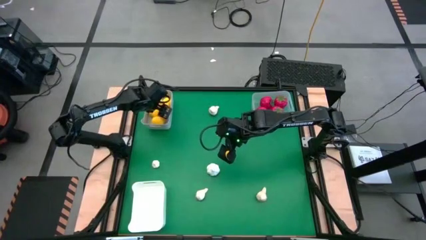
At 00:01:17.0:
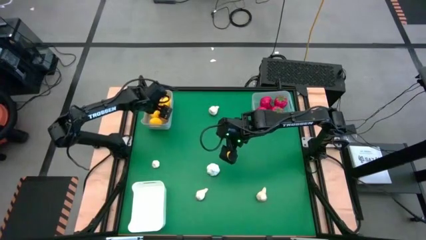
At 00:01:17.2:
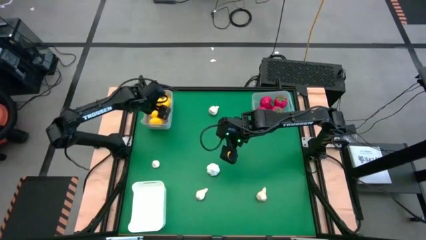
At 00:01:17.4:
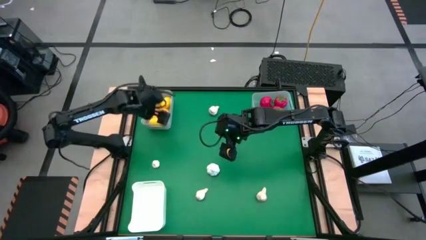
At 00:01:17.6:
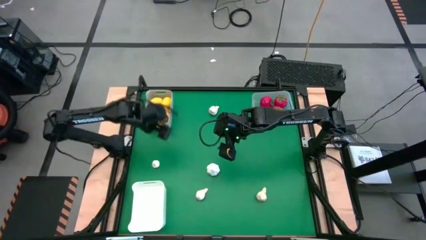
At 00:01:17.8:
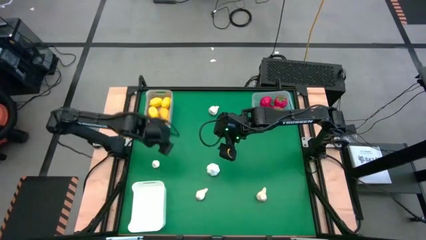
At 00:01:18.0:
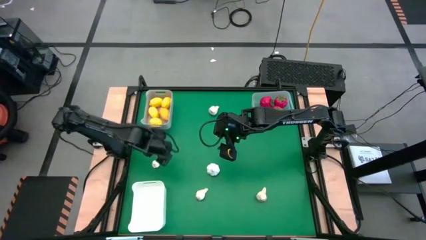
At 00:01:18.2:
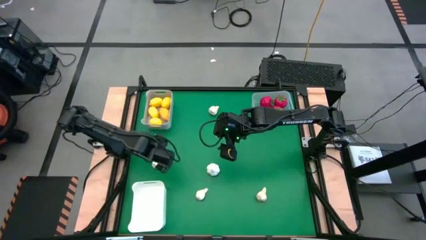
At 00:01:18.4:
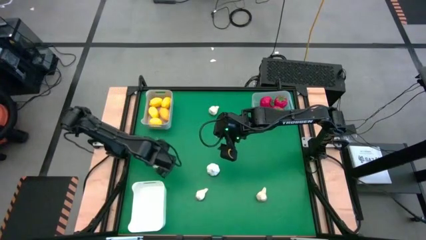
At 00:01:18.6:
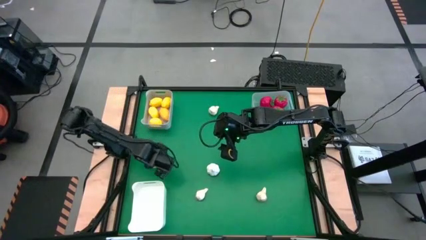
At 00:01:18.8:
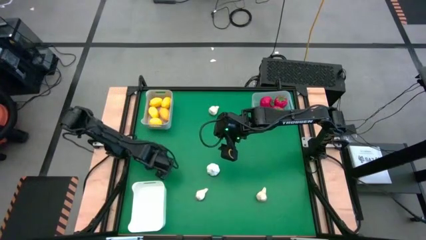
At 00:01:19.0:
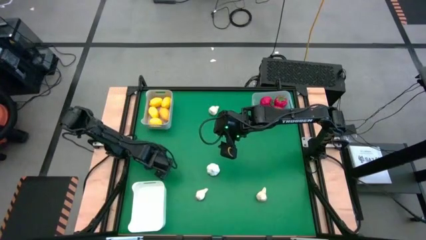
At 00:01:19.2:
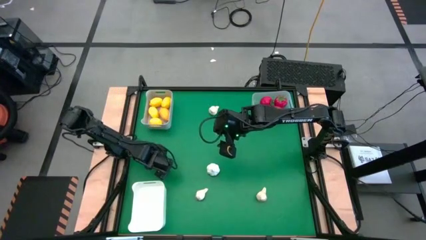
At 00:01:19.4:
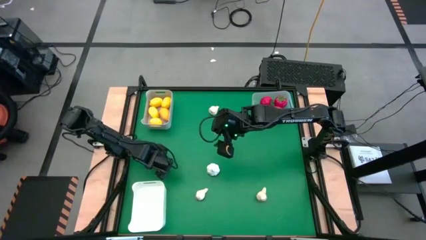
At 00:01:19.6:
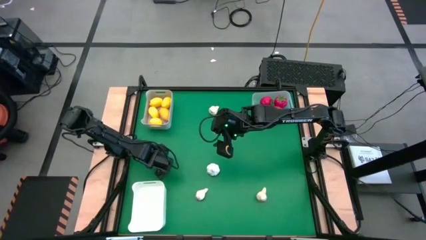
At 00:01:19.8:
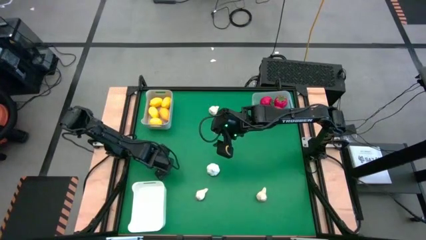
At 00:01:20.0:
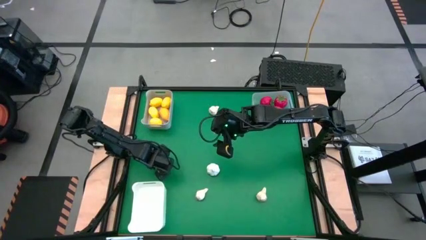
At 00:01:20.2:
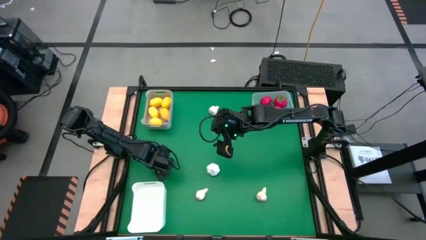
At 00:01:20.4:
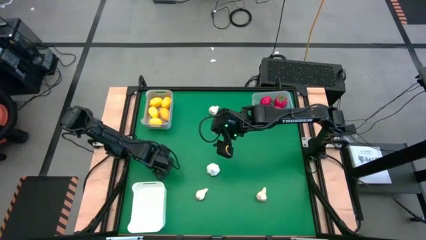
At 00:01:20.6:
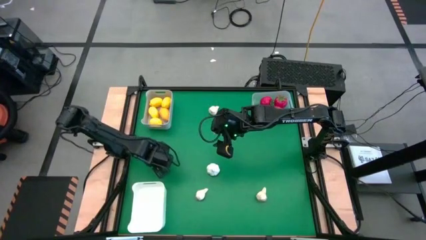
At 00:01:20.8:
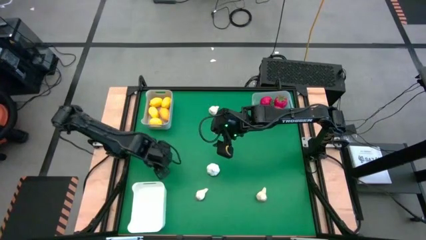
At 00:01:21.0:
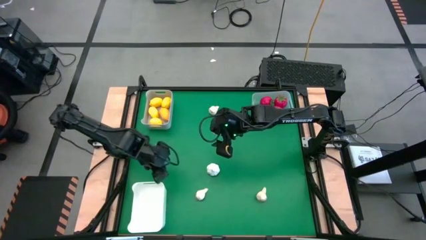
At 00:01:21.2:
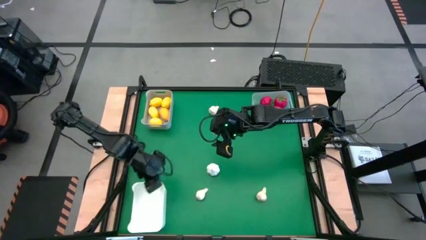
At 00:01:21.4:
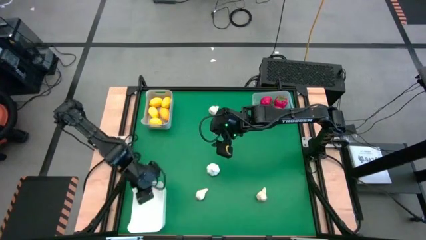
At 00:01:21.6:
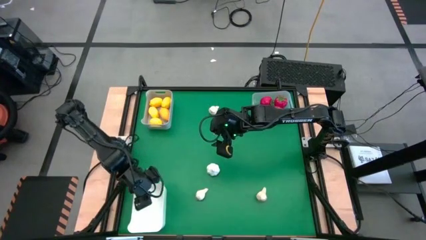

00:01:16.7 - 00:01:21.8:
Task: Sort produce into baskets
Put the garlic into the white bin

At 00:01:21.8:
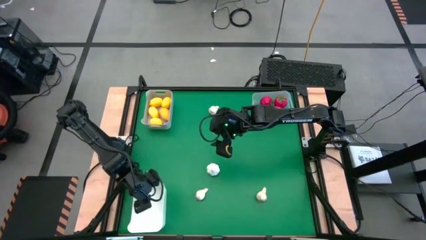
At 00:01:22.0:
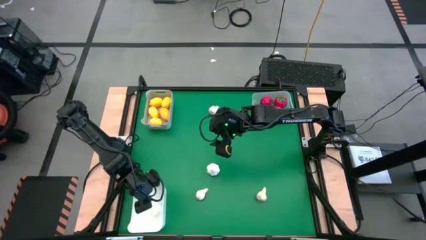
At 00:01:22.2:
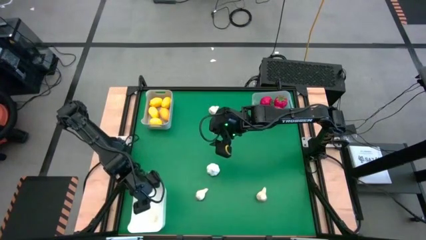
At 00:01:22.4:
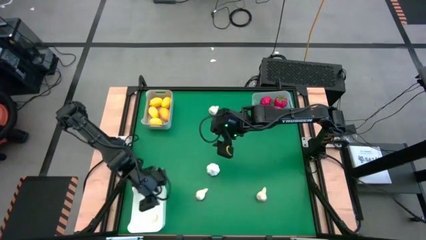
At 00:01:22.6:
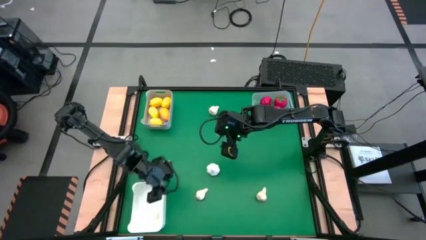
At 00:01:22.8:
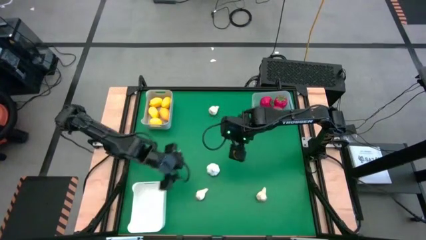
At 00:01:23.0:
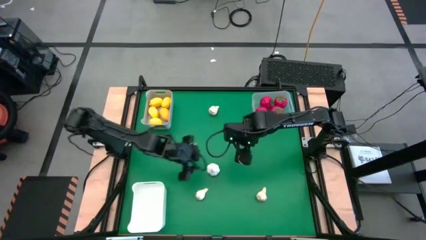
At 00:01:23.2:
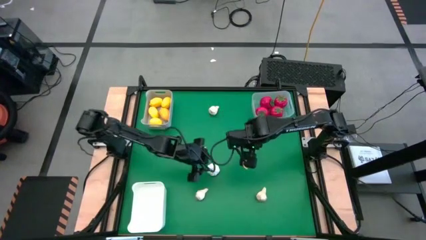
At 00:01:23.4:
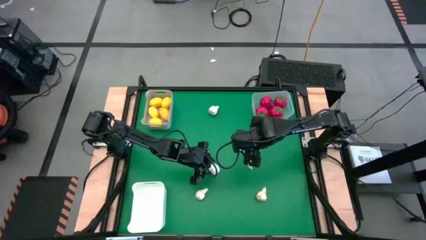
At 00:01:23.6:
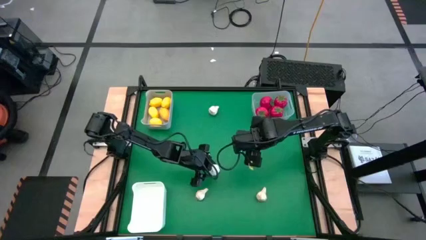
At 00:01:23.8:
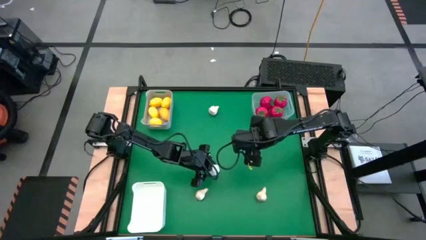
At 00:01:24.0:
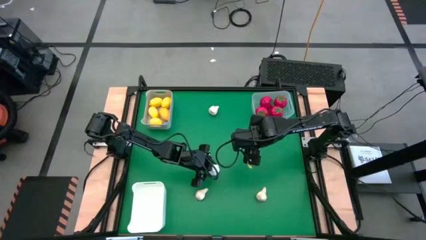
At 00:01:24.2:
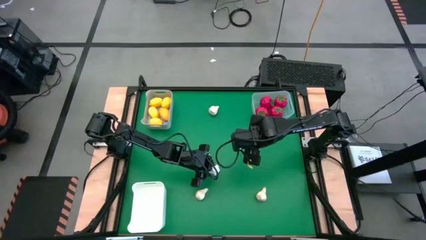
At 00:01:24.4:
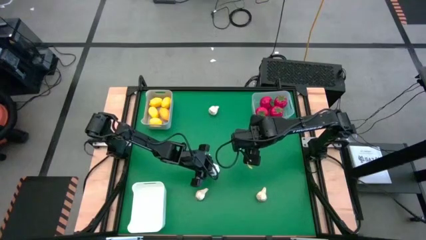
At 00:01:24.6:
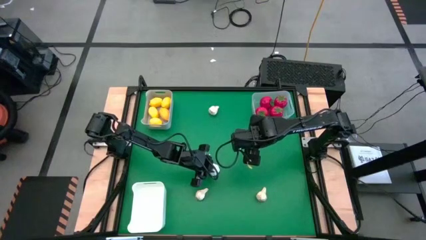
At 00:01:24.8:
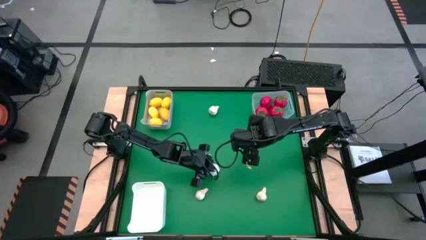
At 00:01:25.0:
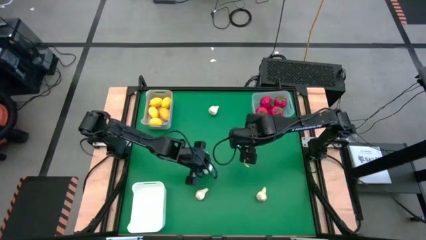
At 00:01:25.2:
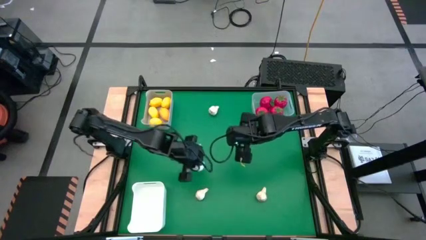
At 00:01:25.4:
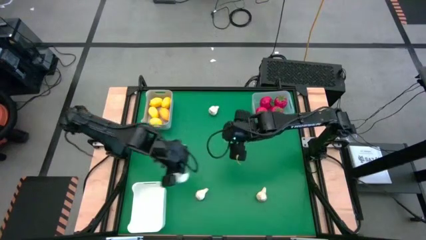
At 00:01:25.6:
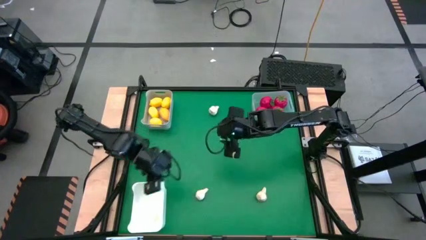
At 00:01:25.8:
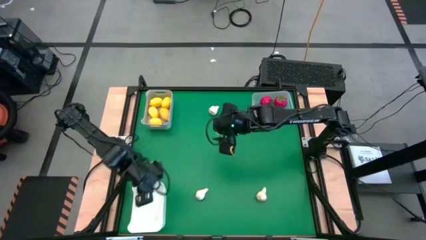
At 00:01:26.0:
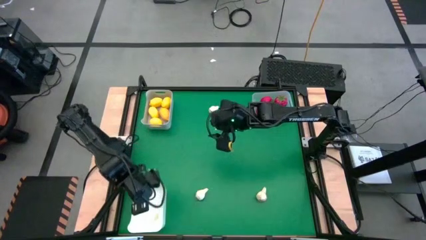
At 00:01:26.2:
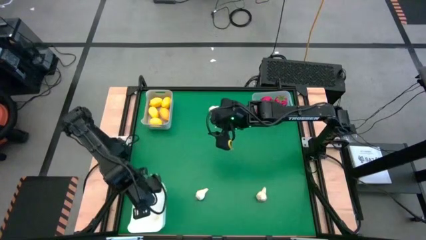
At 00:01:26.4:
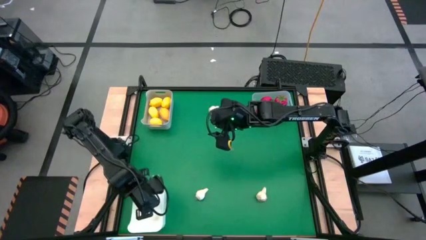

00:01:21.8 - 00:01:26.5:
Put the garlic into the white bin

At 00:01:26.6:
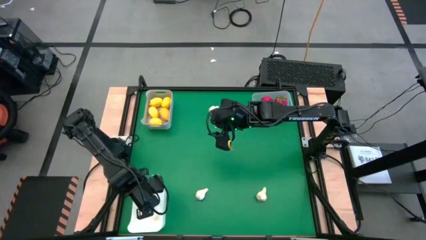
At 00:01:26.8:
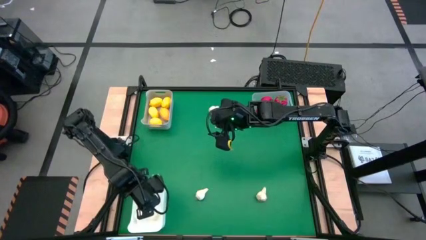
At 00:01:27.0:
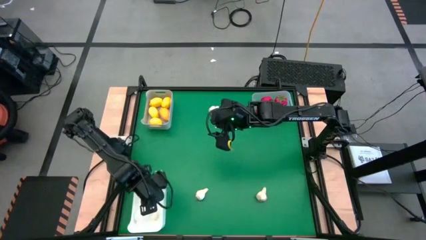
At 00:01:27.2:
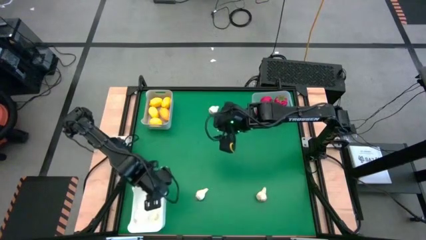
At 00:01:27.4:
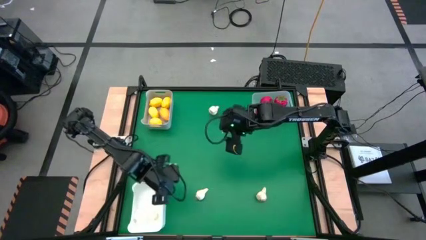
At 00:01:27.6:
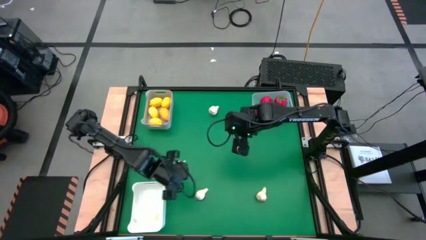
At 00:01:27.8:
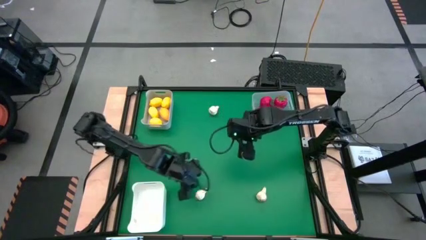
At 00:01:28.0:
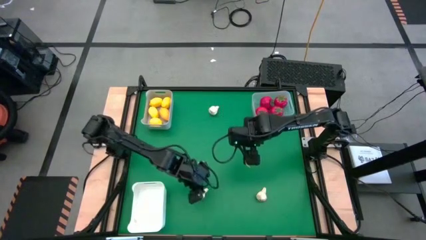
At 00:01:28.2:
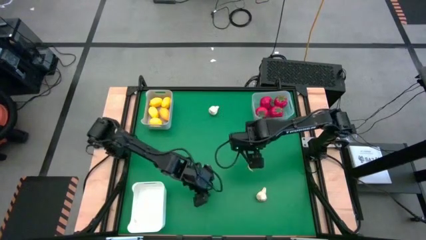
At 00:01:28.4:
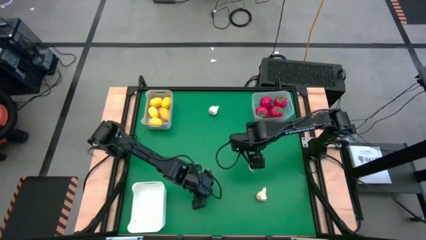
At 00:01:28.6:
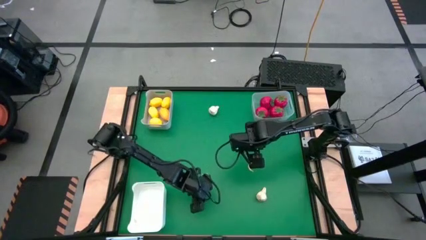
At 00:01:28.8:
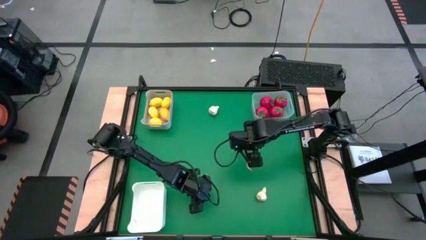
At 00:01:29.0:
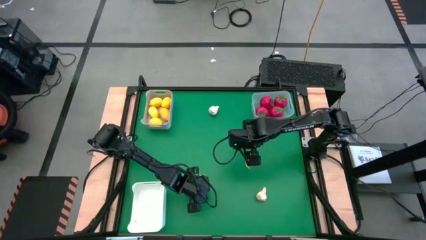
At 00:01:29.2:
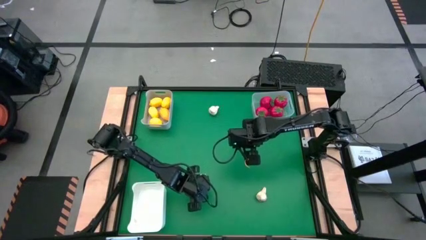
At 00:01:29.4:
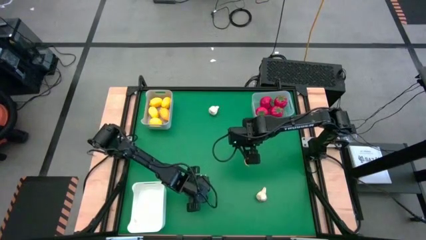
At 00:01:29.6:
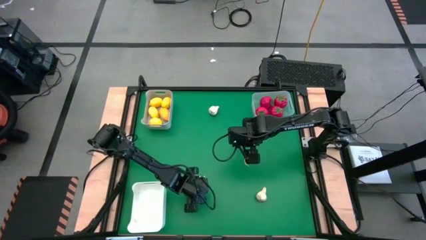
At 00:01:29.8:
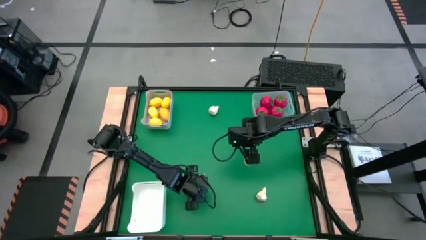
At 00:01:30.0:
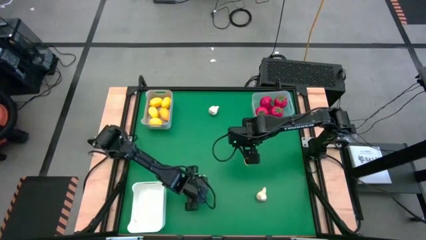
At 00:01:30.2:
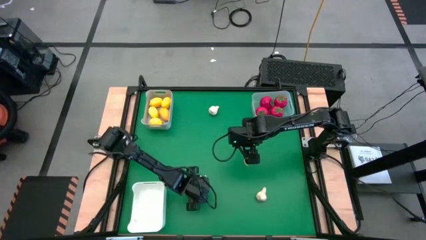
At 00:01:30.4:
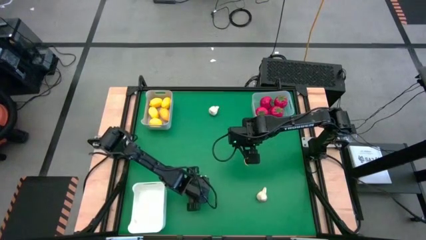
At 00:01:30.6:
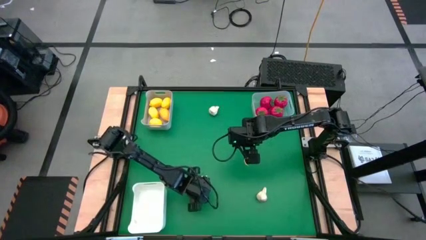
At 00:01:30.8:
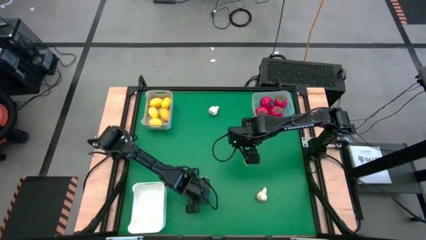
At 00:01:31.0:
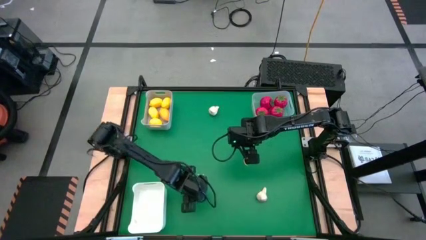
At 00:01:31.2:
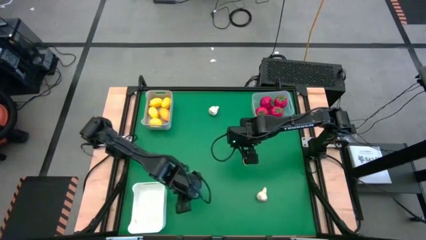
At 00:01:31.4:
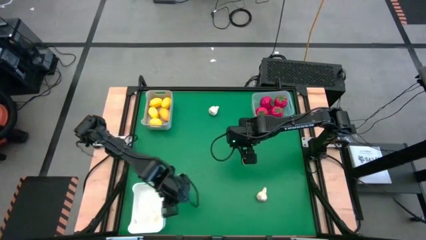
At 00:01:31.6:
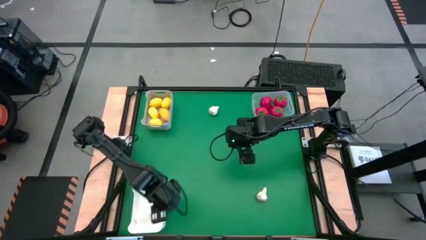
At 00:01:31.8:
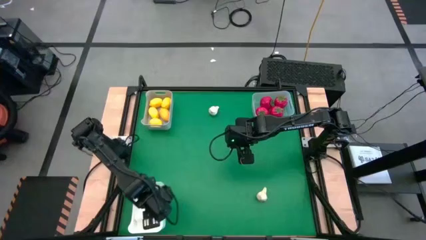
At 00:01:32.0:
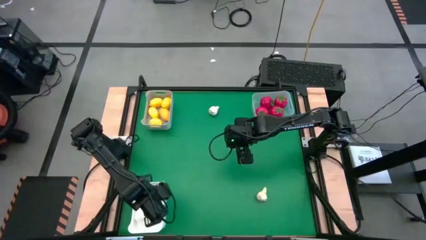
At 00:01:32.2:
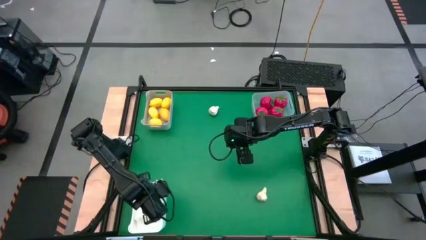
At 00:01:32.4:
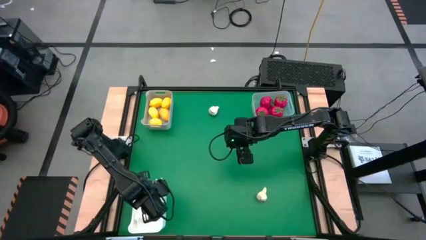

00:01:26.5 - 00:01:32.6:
Put the garlic into the white bin
